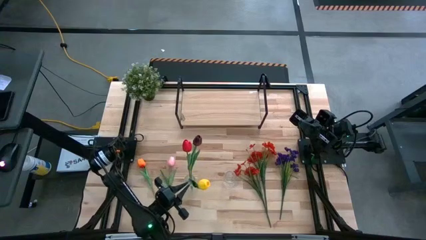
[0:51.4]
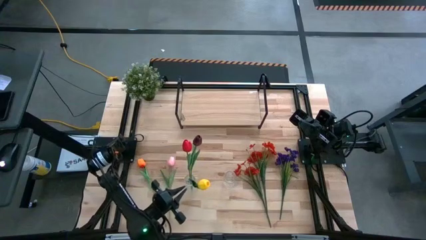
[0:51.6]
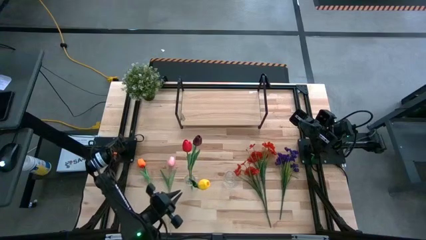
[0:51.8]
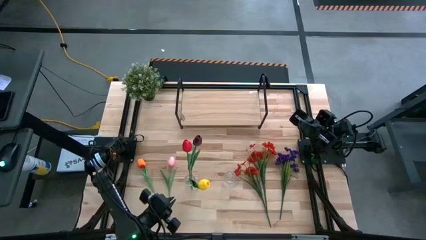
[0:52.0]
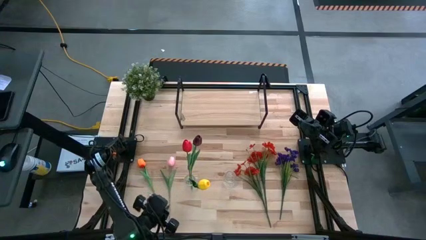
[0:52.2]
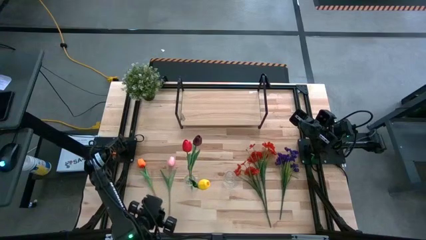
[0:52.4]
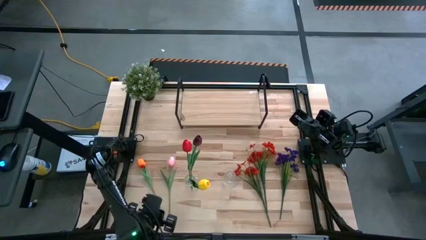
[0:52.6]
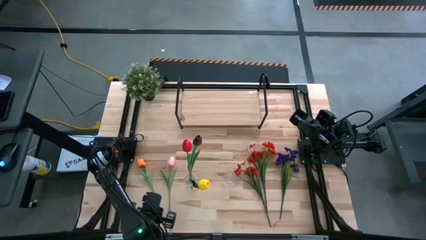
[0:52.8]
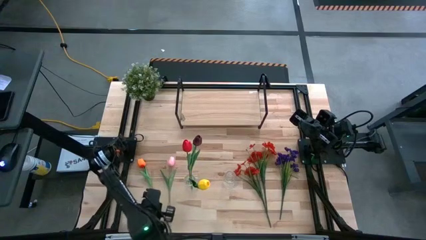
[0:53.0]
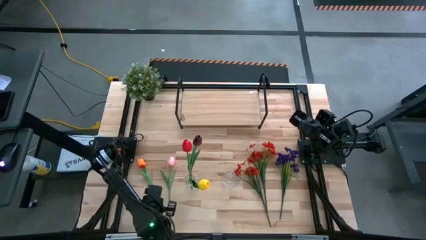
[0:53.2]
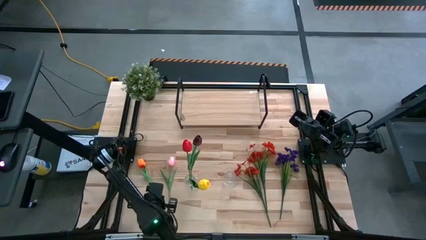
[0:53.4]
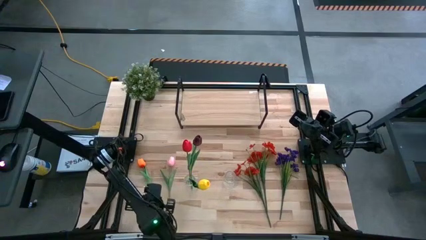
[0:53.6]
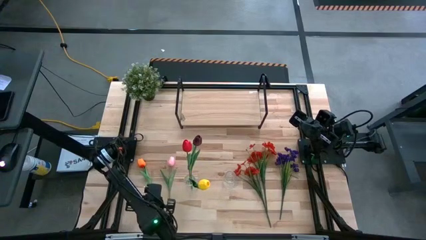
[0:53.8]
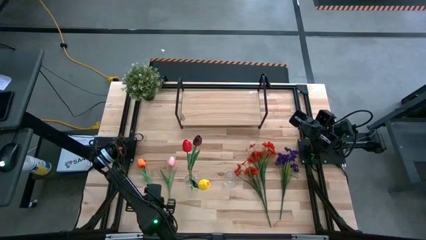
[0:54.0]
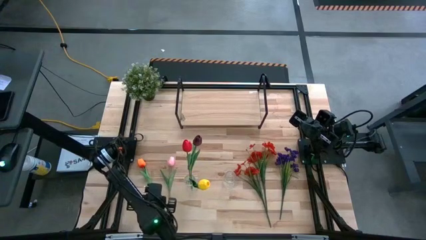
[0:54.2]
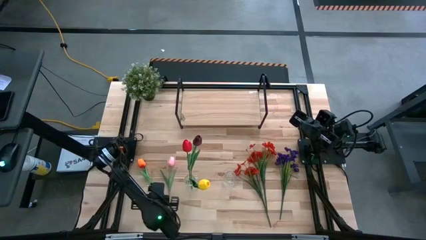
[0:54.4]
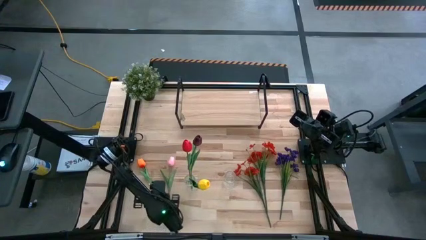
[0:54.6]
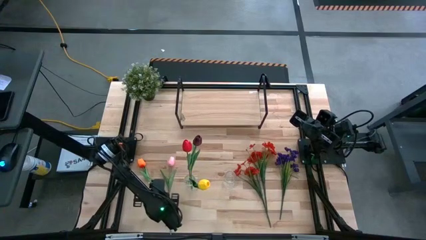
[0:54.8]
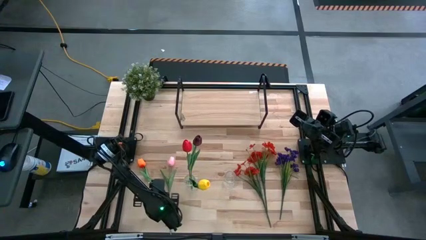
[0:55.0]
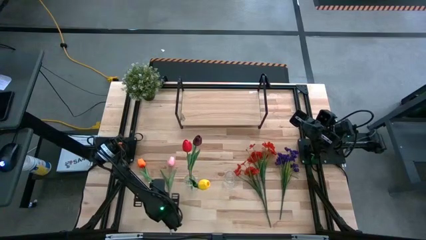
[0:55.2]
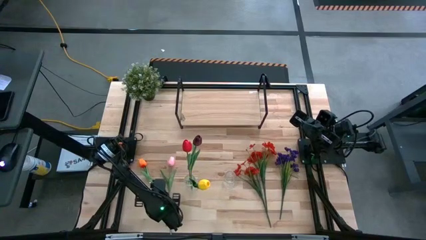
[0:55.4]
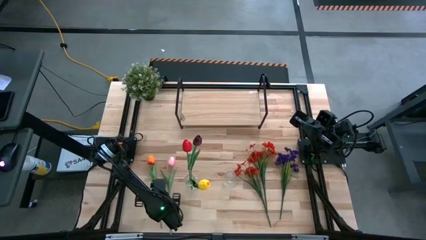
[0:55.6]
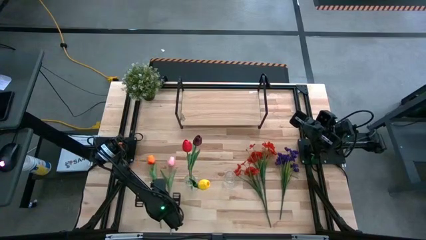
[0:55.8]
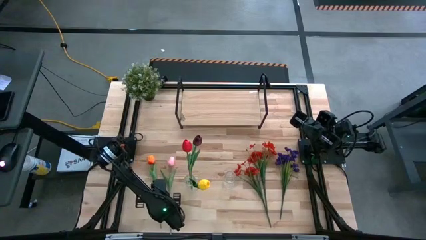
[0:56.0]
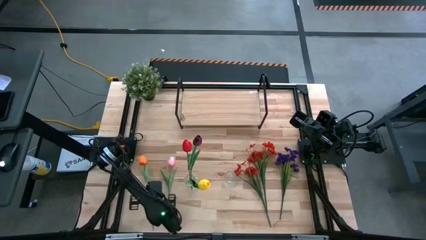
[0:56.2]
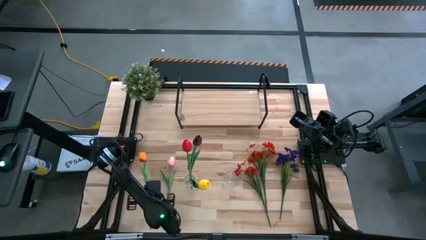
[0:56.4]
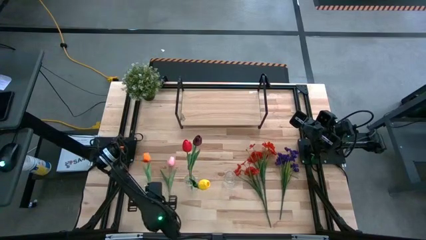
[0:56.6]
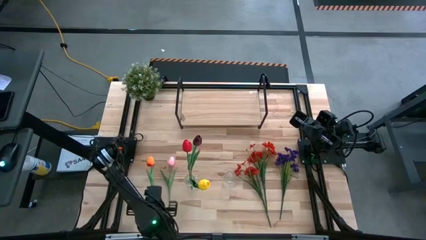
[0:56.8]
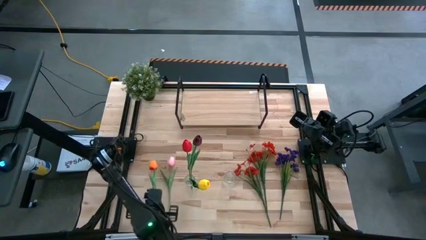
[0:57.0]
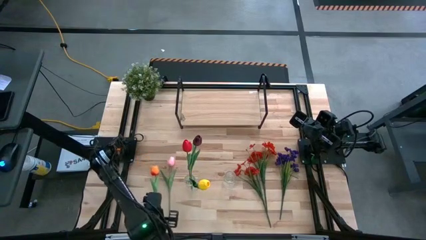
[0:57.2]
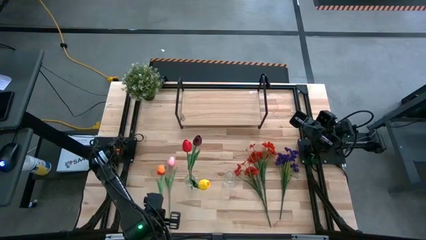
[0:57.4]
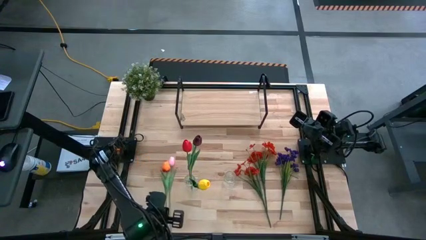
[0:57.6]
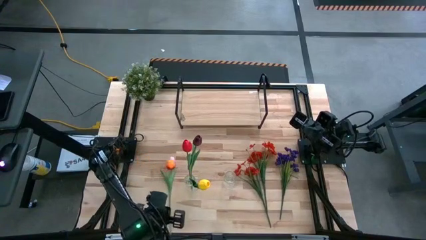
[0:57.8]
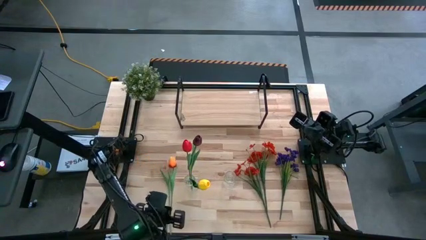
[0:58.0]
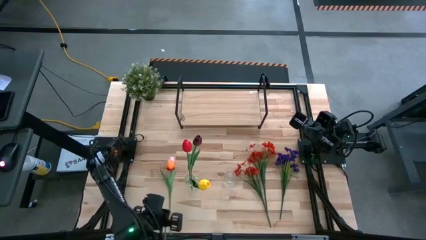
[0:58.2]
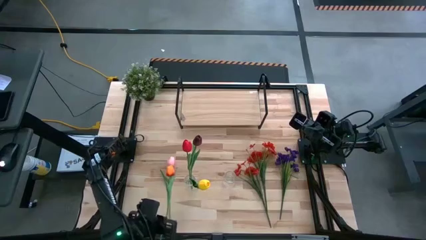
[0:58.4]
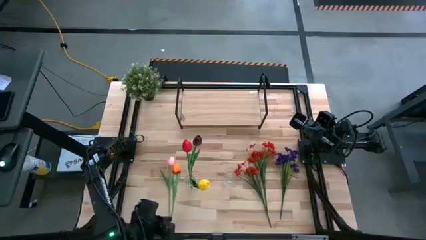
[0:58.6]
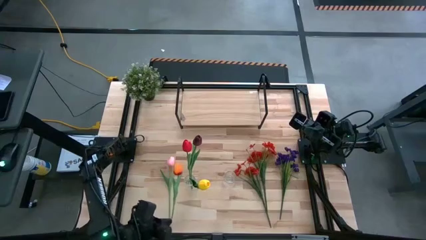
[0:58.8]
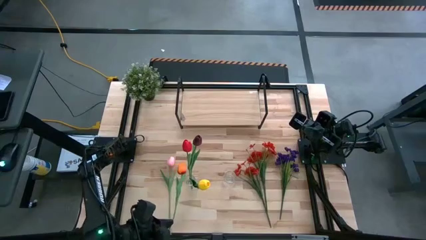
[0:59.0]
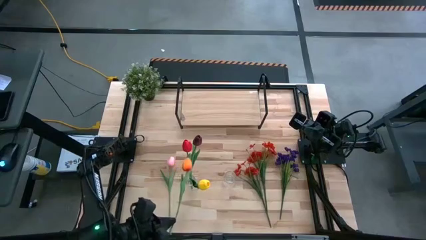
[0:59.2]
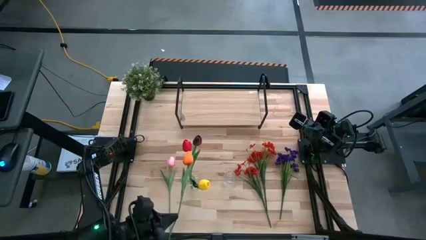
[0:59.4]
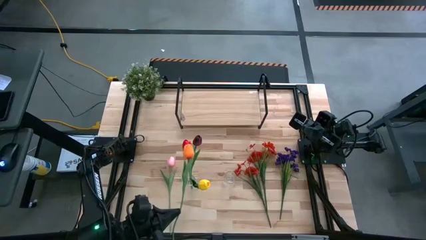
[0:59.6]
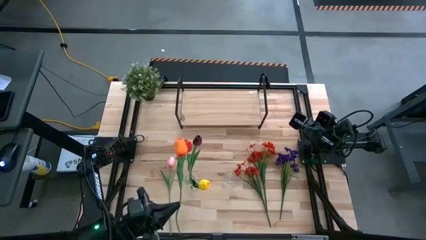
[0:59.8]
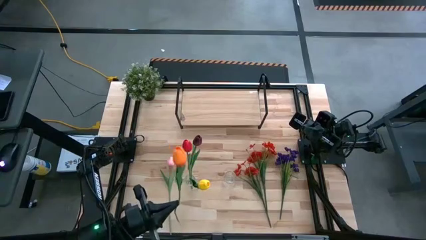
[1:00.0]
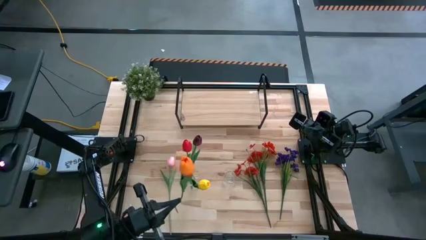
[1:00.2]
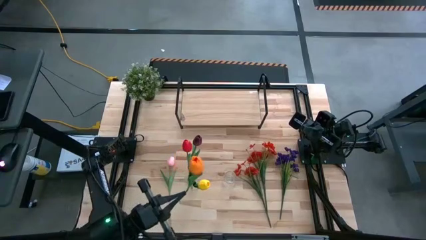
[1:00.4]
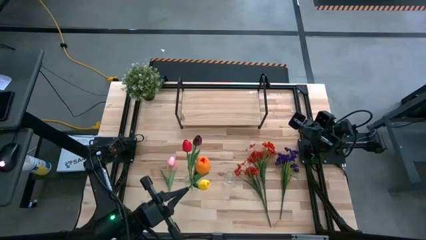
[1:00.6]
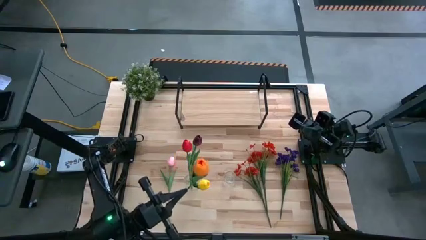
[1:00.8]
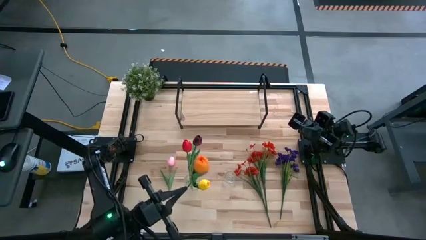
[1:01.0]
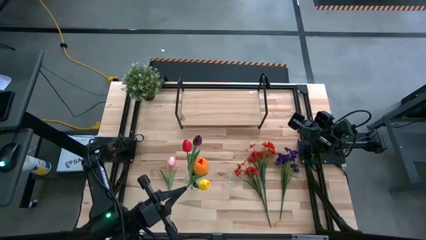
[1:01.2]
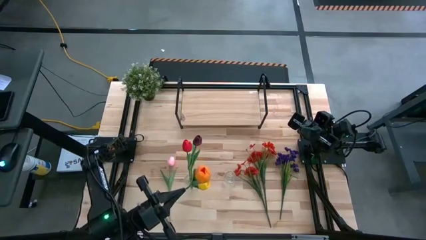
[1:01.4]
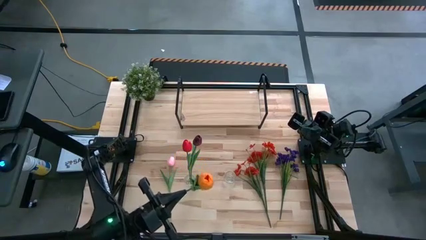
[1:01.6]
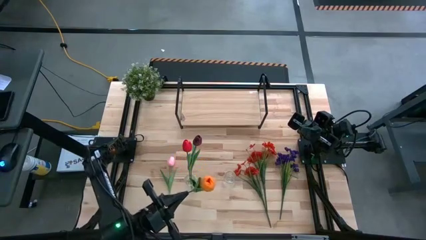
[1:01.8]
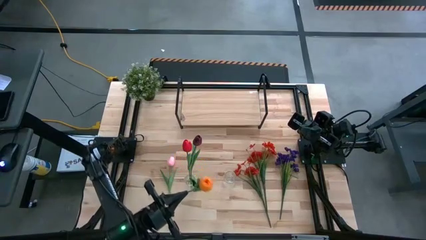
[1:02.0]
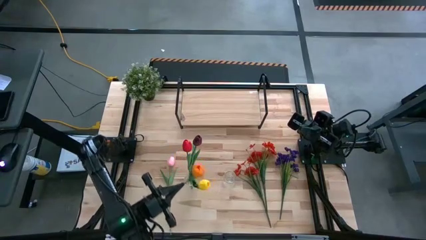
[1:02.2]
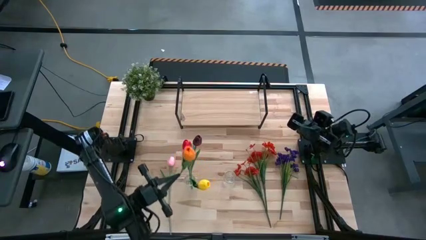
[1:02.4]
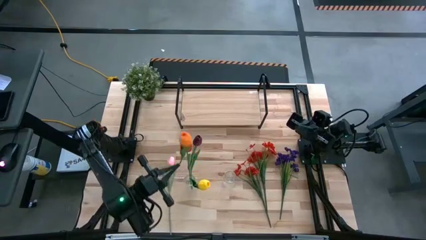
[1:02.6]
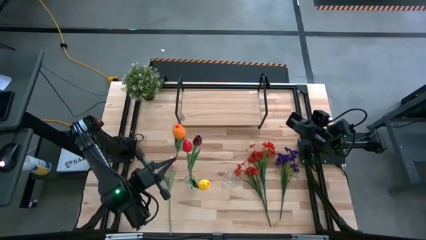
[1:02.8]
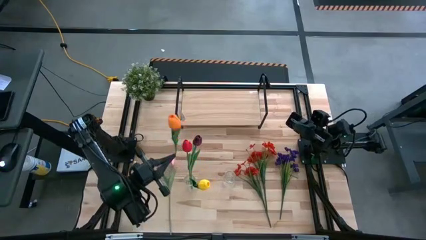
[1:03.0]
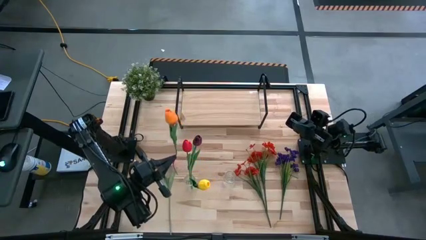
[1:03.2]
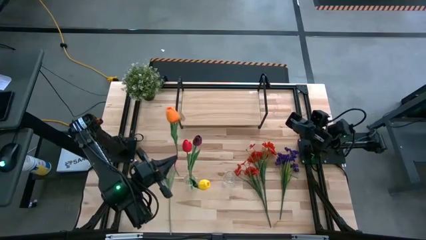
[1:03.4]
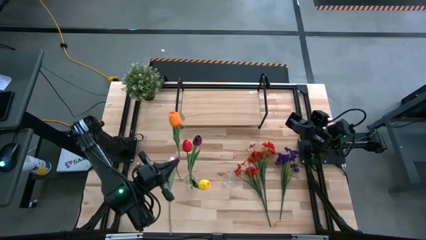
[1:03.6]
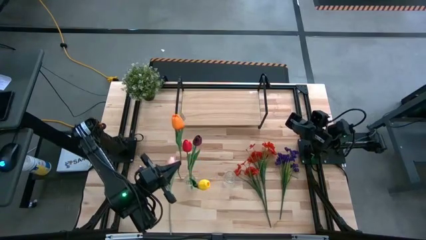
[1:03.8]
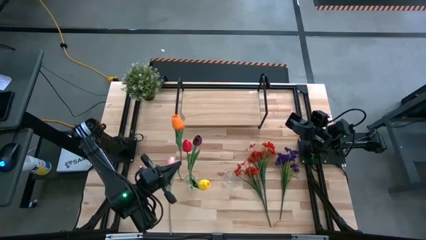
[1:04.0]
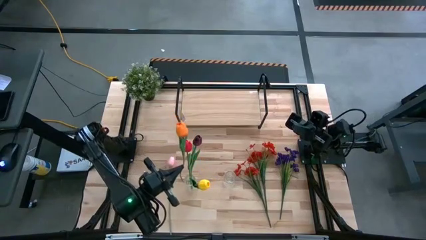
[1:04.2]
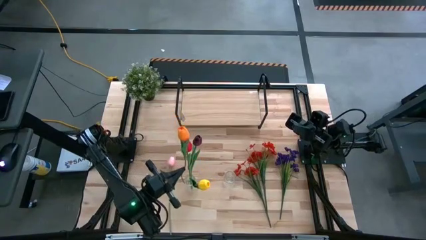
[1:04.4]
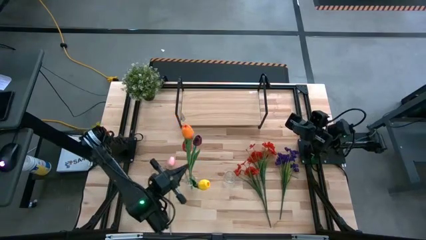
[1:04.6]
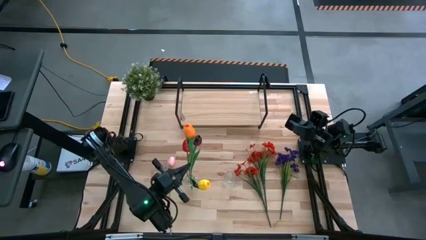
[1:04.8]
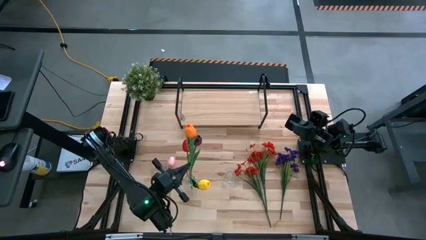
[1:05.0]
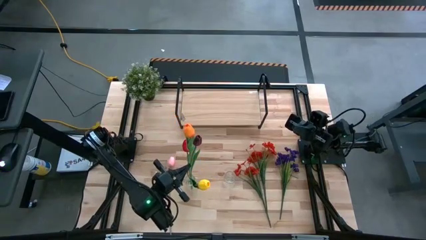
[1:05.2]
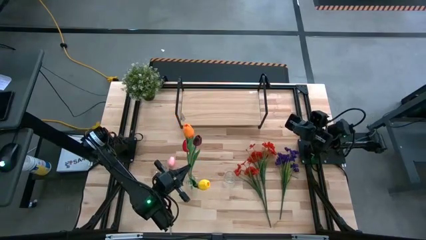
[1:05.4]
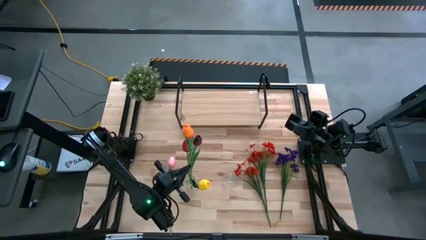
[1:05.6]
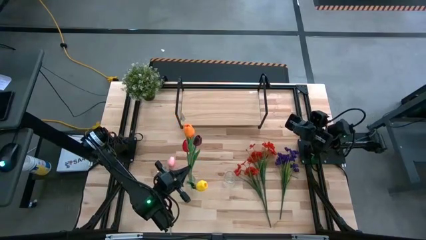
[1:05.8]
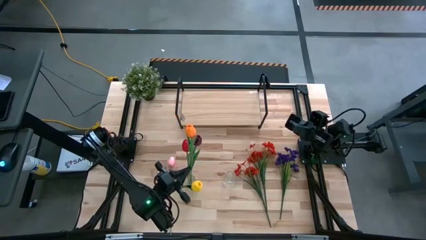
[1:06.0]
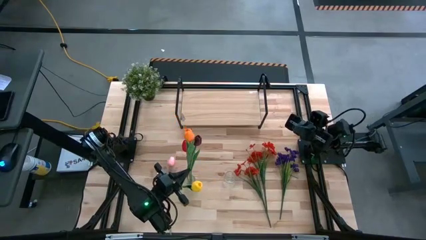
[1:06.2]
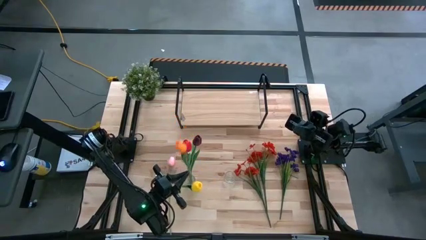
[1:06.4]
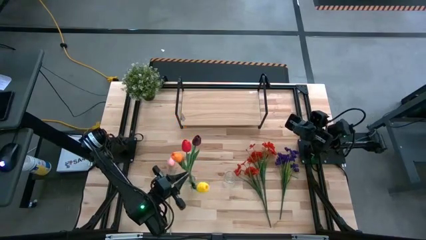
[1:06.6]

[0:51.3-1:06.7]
Task: Pick and place flowers into a vace then onto a shelf
Put the orange flower into the left transparent vase
